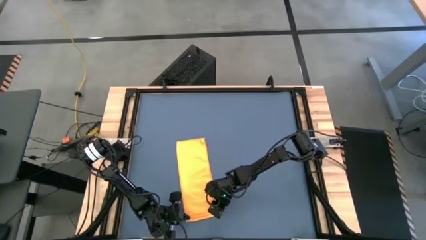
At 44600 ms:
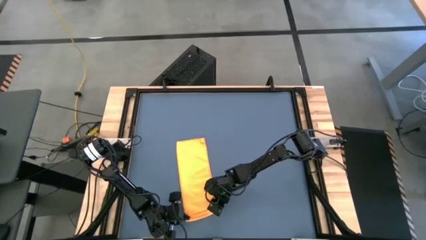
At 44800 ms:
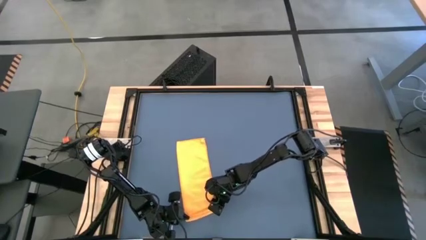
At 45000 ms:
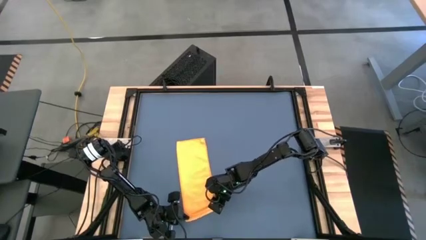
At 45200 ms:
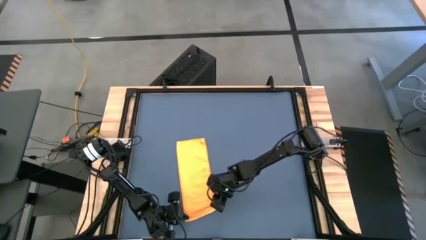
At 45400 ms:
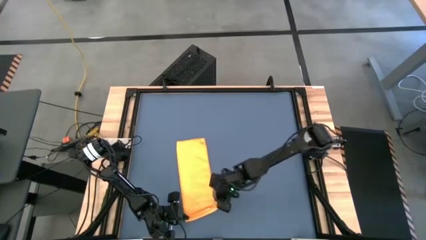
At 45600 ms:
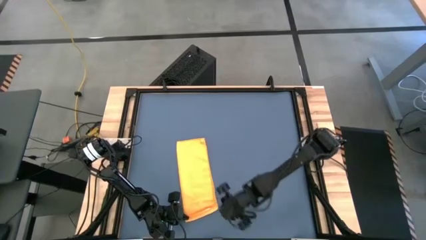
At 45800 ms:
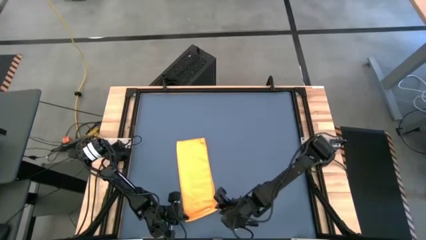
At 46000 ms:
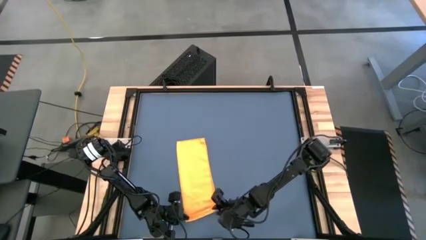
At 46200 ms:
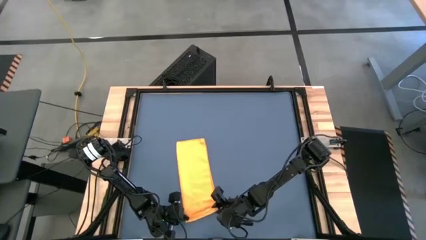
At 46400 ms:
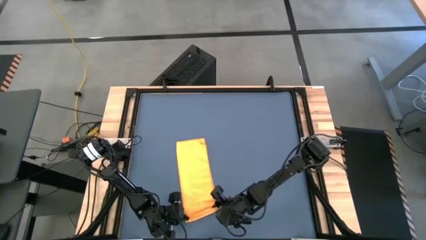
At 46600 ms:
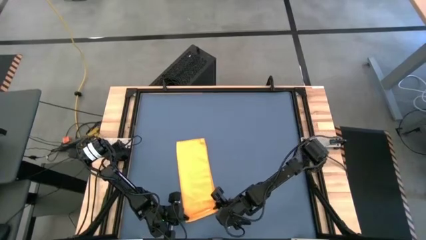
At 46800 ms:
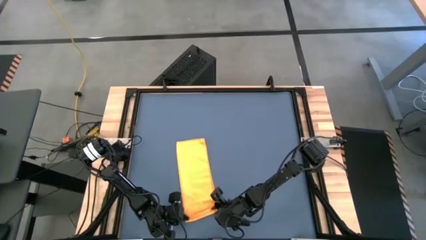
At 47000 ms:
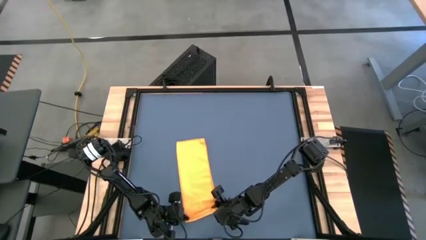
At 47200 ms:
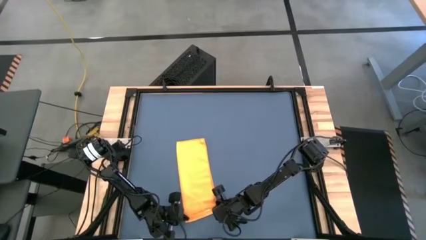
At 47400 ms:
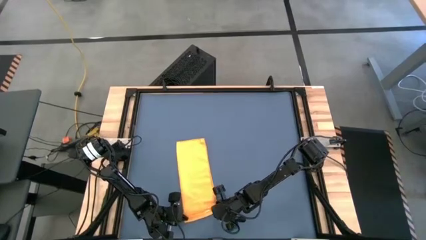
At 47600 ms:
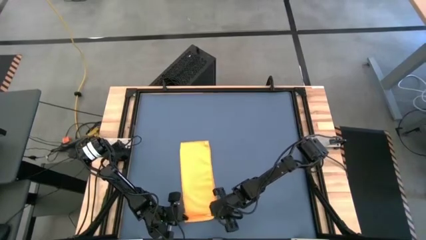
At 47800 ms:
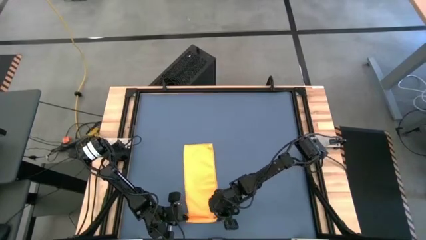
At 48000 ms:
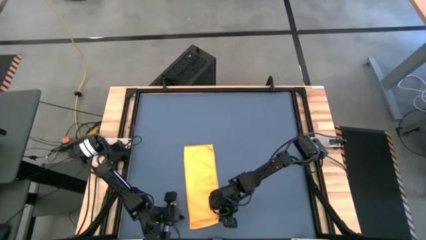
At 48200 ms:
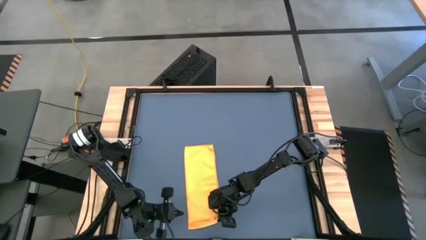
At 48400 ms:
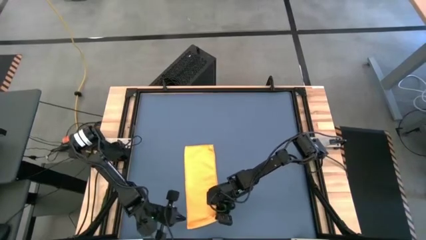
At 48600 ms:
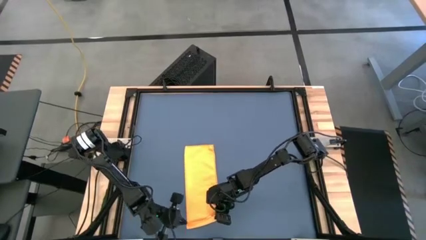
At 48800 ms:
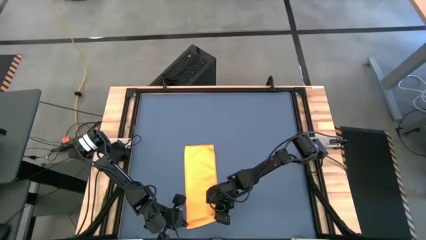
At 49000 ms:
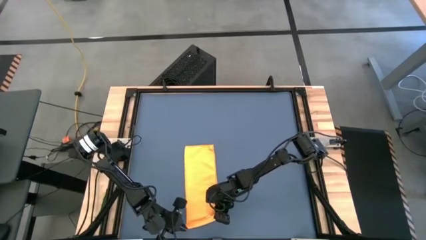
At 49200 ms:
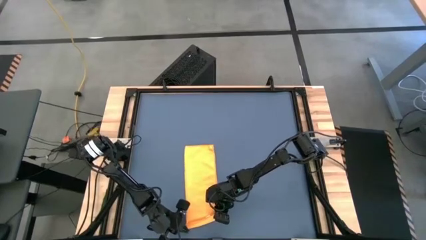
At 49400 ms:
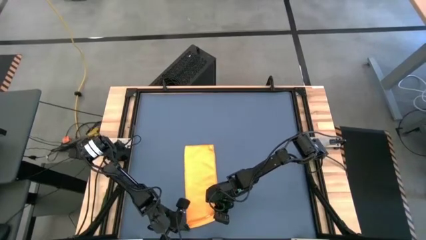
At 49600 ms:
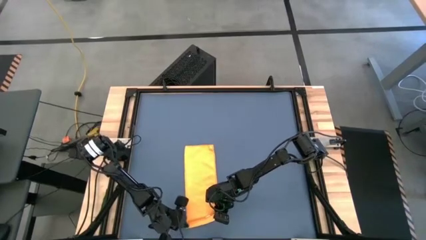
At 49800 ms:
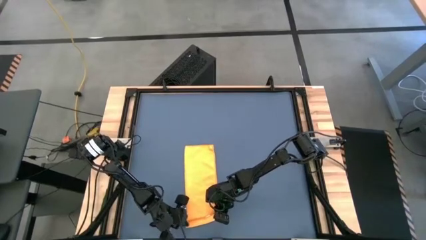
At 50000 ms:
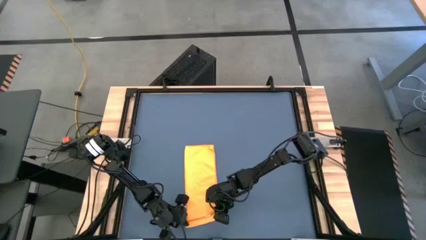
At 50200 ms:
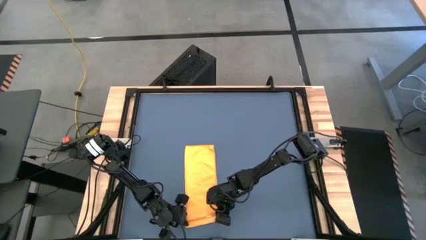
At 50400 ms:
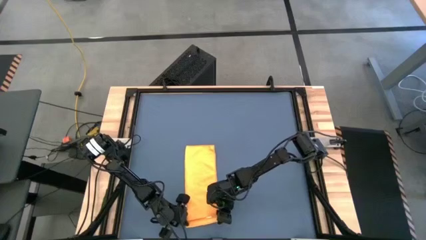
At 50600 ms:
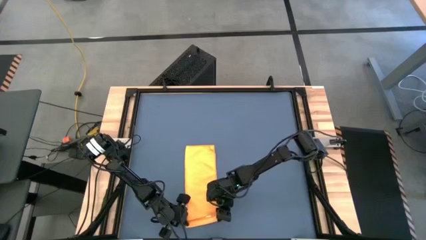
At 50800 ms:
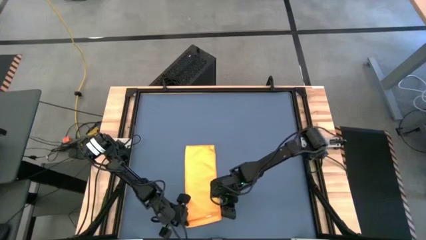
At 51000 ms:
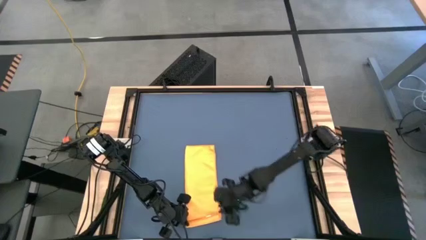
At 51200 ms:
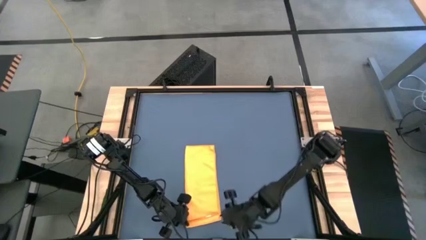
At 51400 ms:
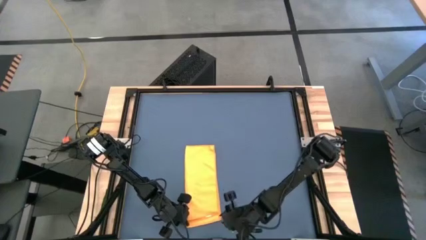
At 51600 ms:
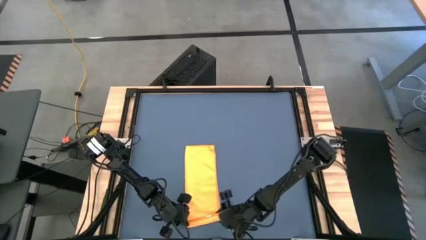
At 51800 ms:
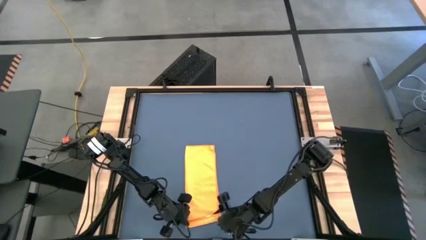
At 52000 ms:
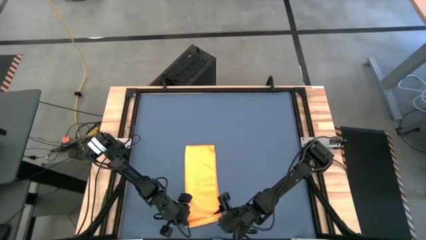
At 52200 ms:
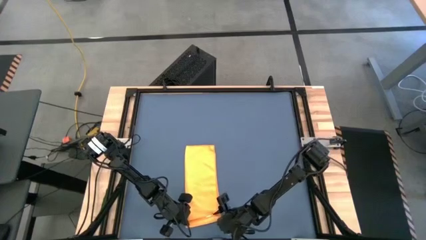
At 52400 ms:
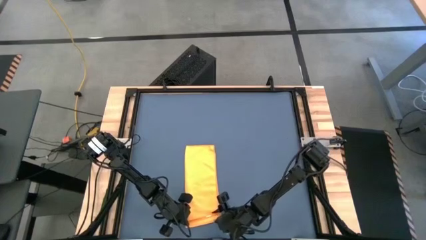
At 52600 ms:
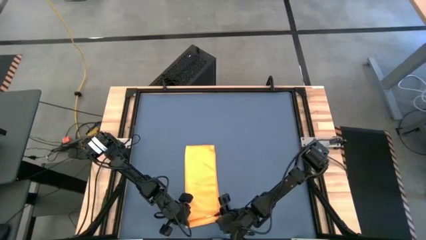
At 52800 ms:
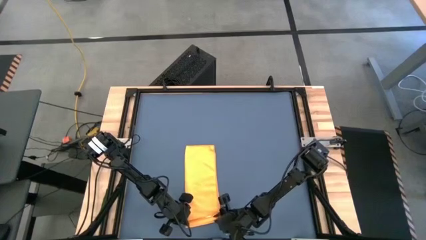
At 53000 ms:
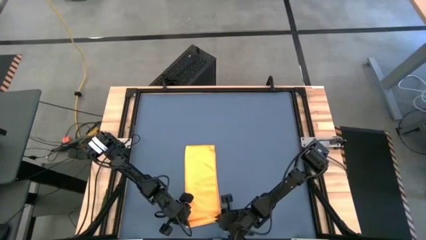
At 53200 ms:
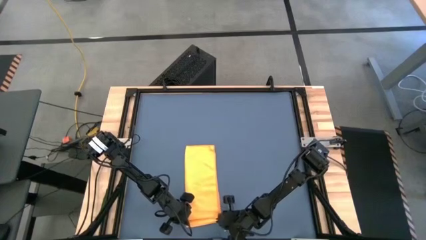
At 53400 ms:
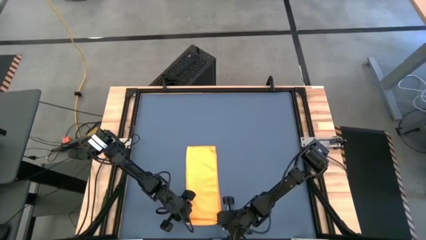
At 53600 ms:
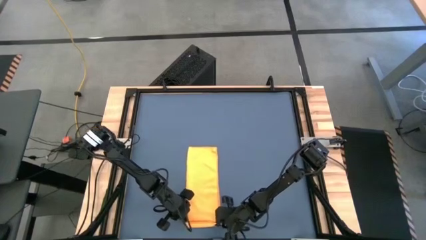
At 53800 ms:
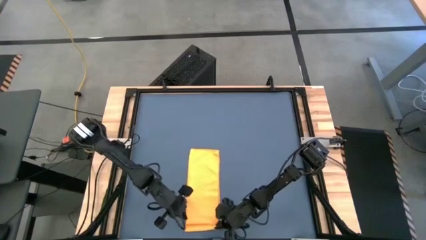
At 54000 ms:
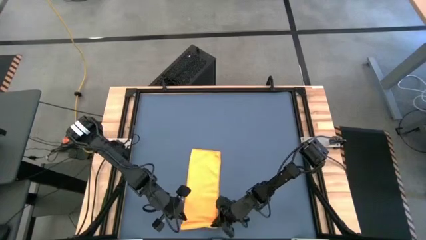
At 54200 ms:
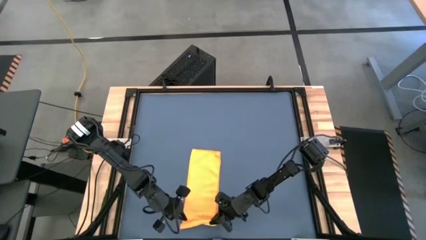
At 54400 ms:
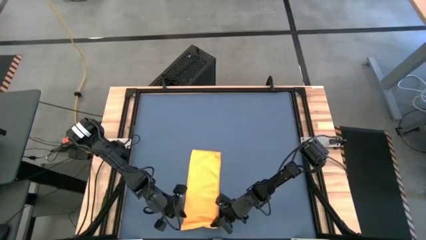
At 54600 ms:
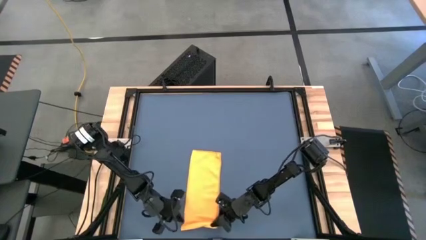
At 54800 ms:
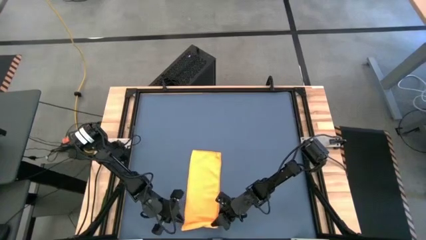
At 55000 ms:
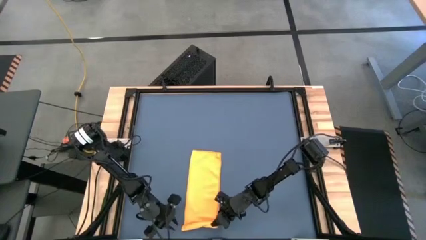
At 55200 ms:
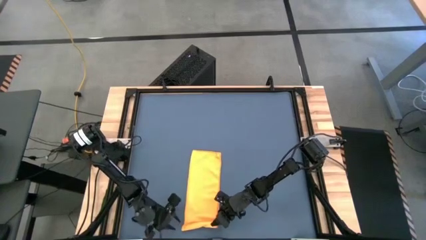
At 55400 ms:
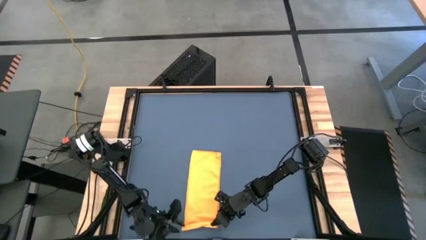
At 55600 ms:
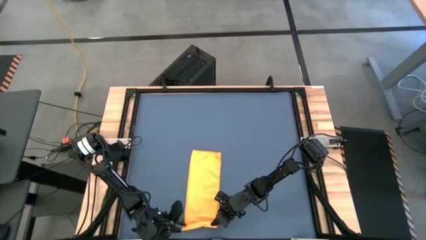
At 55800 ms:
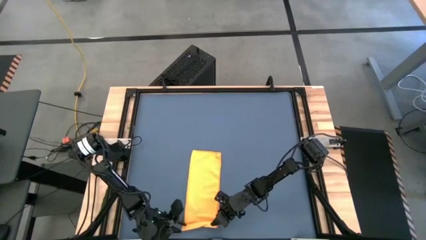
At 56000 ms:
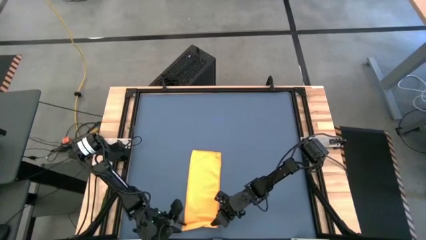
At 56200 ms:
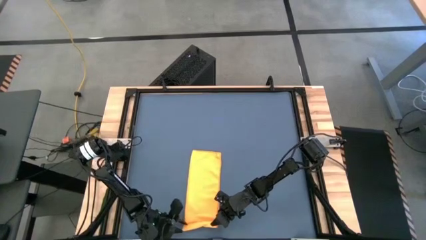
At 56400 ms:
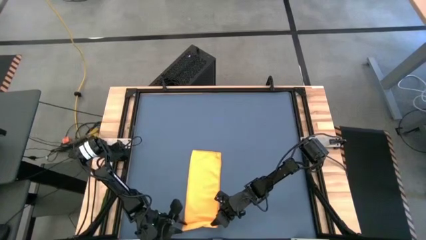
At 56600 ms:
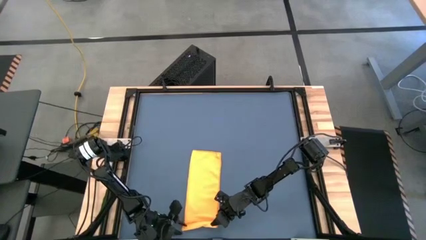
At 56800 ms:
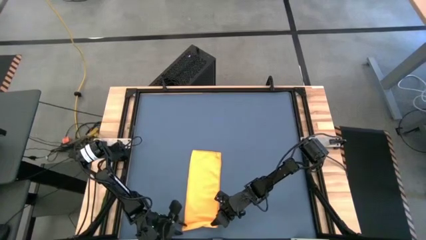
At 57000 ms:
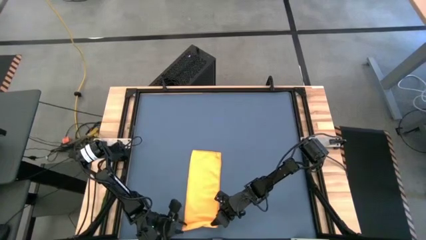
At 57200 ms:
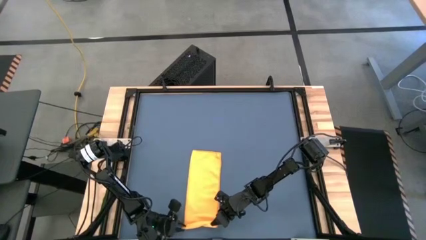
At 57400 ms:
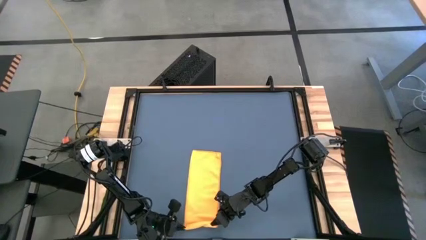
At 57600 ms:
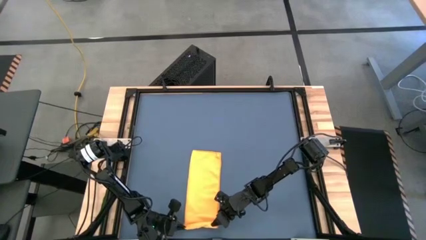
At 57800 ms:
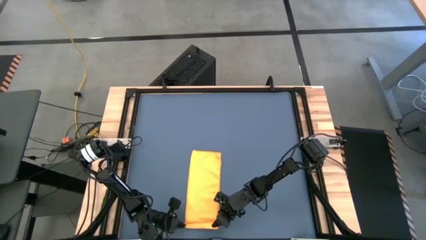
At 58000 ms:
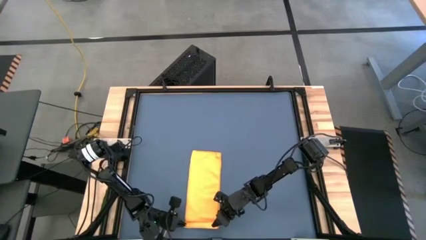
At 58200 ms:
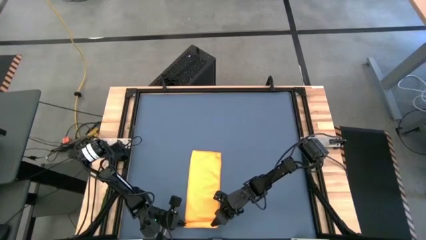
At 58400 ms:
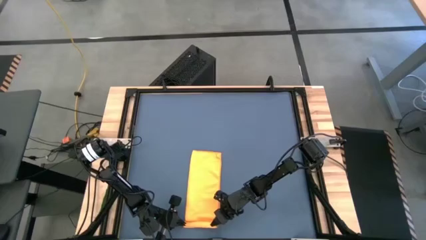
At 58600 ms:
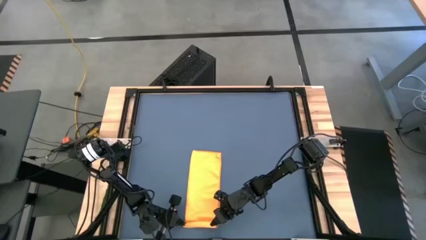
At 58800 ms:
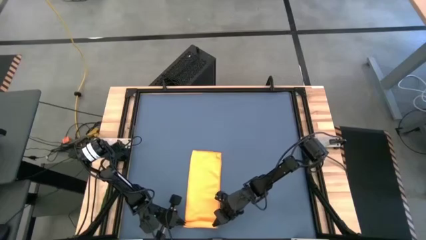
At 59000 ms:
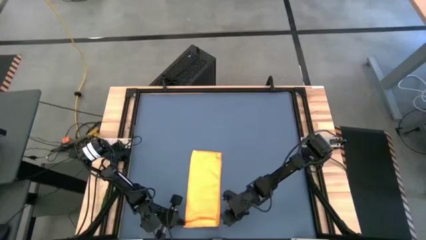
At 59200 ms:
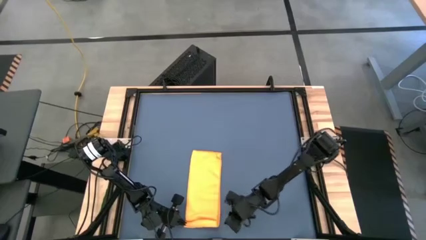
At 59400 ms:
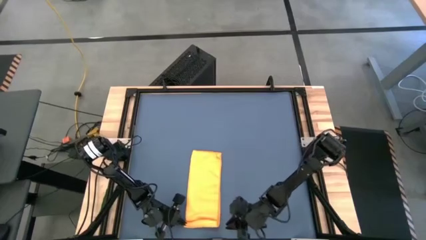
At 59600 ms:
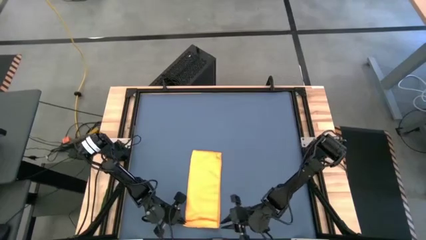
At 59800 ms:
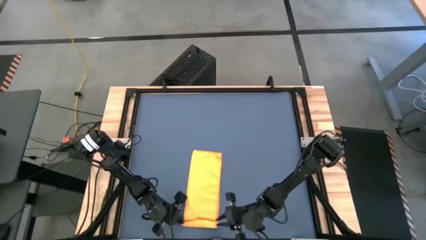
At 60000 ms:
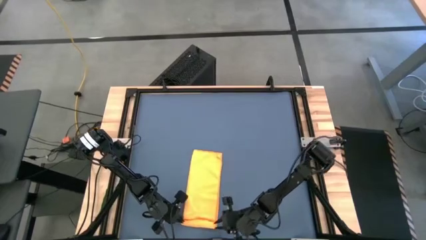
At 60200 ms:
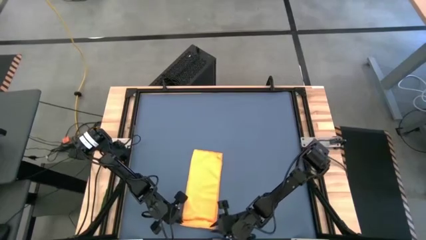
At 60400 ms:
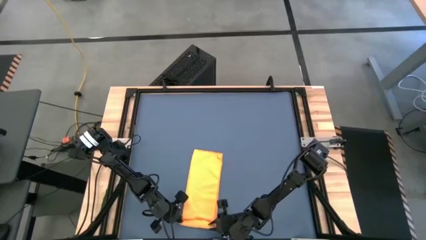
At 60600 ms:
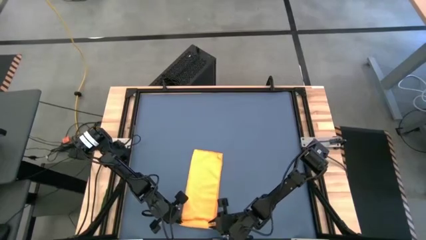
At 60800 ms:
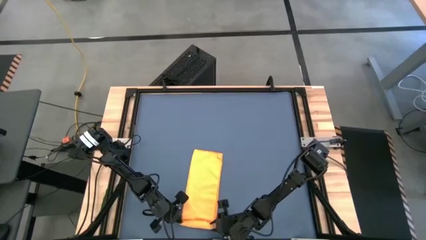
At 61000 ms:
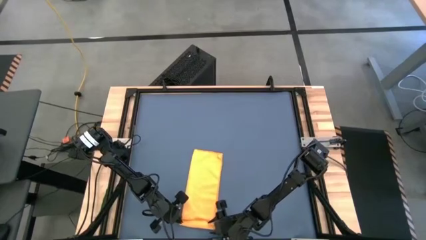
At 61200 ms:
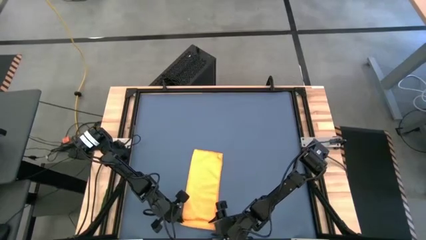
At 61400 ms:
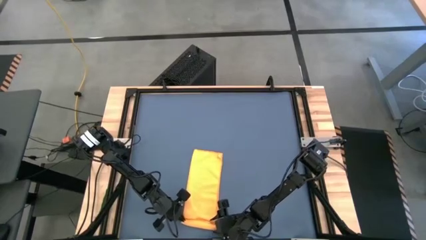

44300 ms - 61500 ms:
Task: Roll towel
Roll the yellow towel
